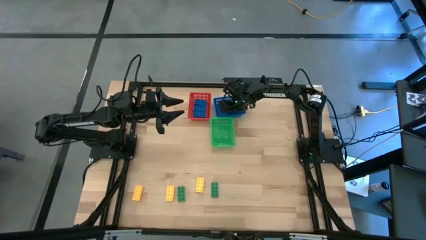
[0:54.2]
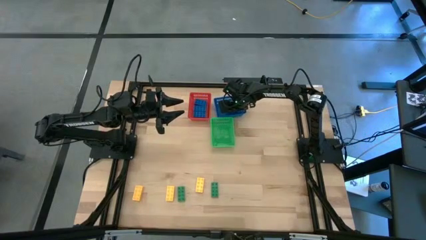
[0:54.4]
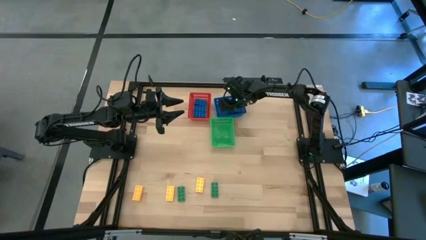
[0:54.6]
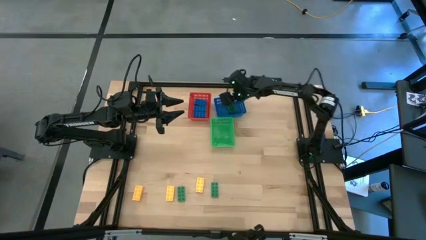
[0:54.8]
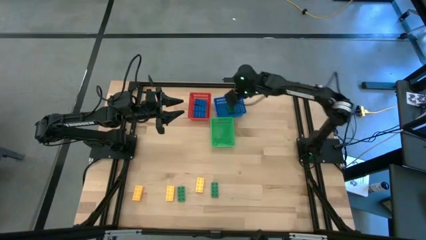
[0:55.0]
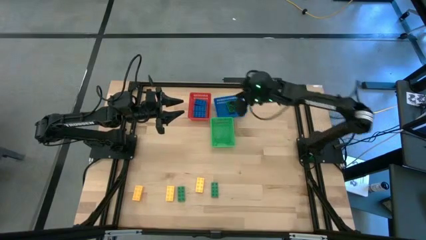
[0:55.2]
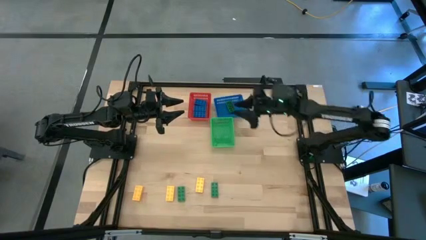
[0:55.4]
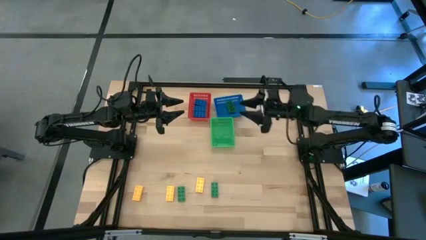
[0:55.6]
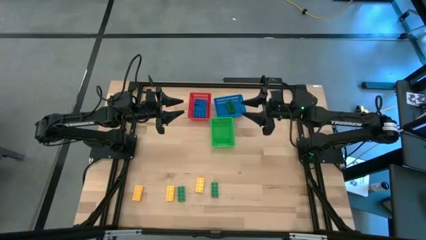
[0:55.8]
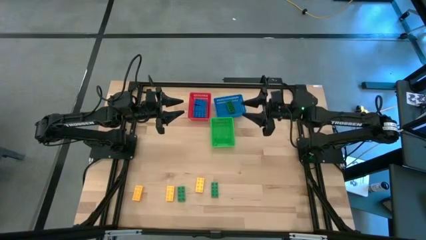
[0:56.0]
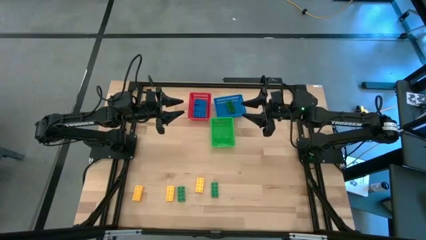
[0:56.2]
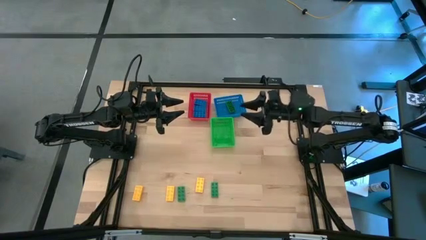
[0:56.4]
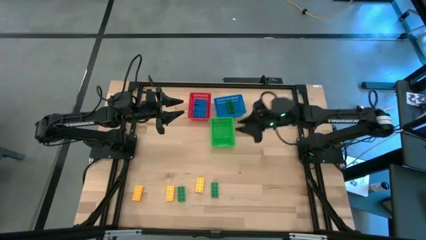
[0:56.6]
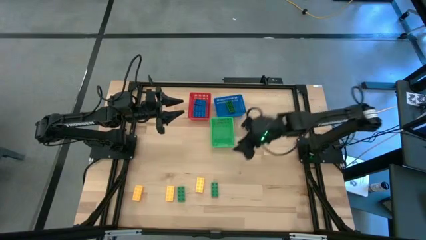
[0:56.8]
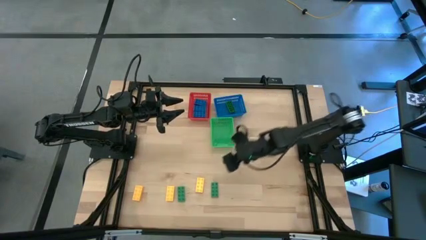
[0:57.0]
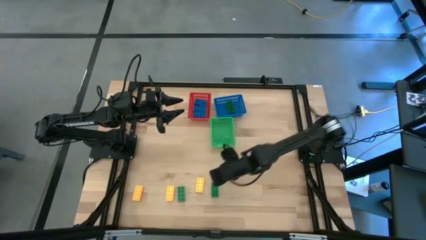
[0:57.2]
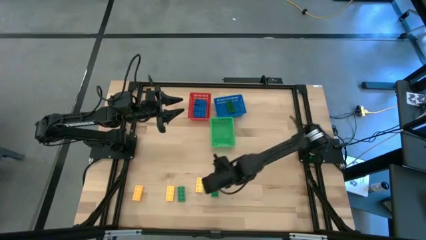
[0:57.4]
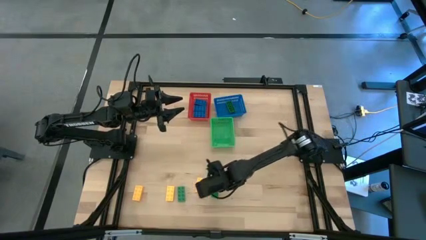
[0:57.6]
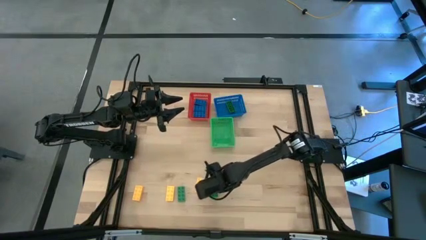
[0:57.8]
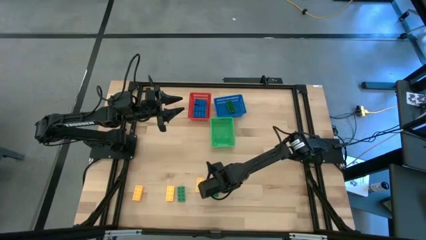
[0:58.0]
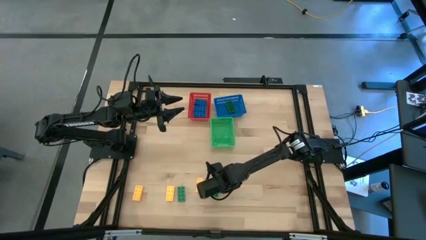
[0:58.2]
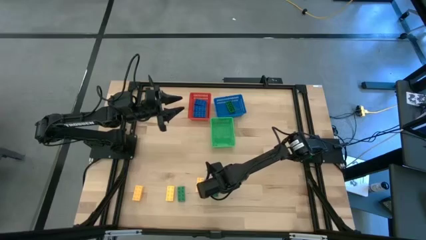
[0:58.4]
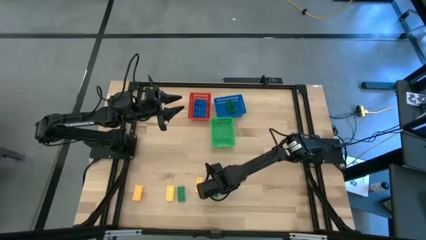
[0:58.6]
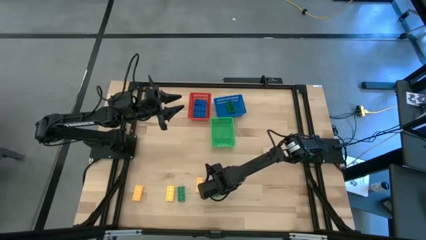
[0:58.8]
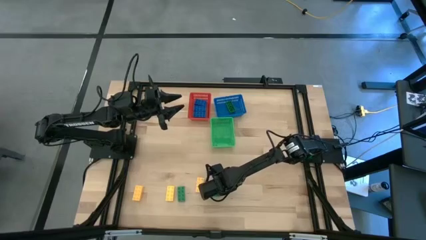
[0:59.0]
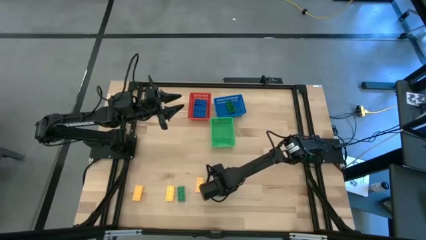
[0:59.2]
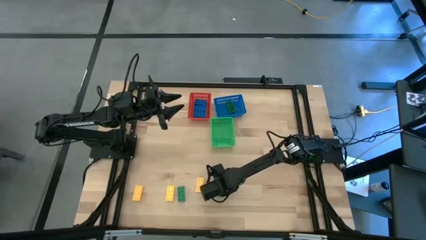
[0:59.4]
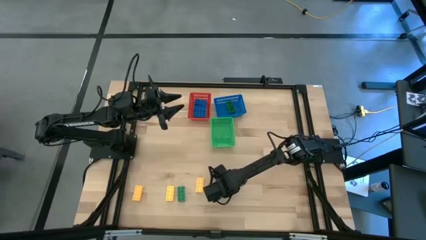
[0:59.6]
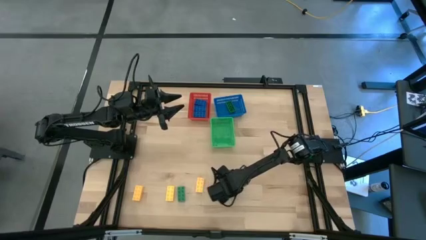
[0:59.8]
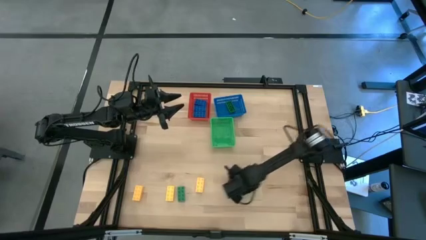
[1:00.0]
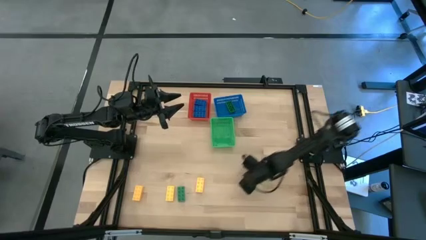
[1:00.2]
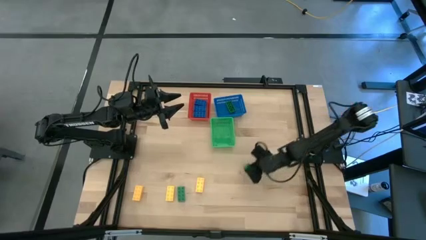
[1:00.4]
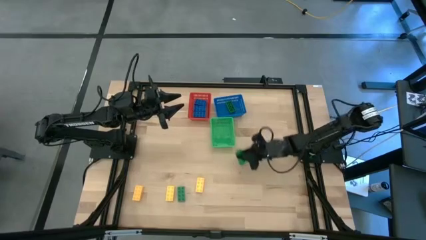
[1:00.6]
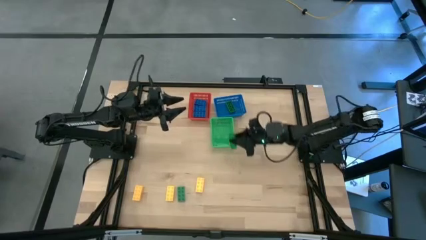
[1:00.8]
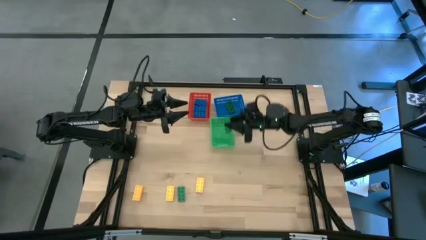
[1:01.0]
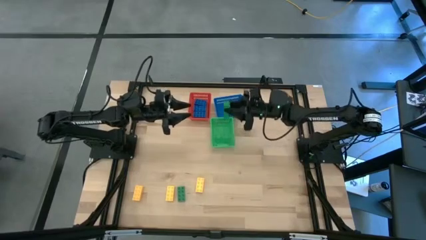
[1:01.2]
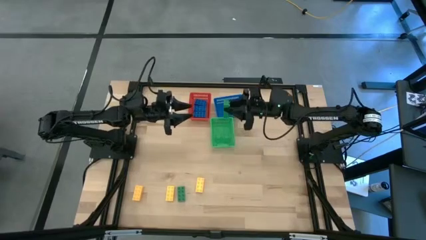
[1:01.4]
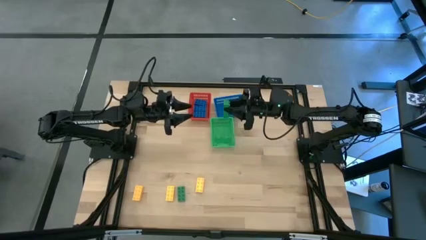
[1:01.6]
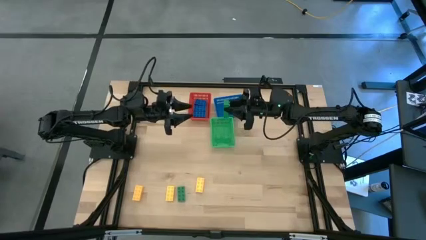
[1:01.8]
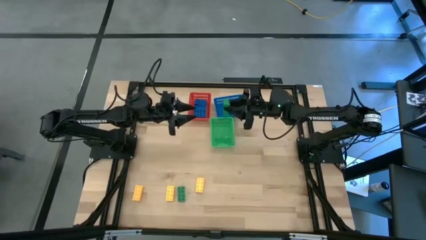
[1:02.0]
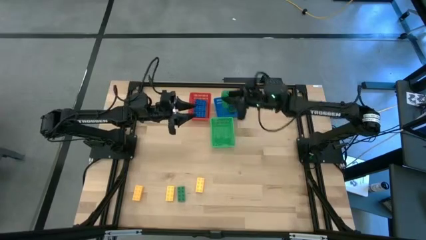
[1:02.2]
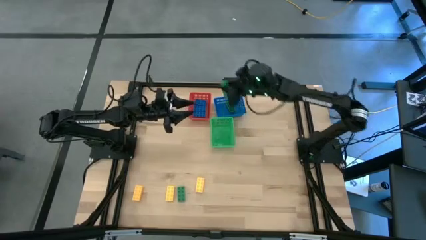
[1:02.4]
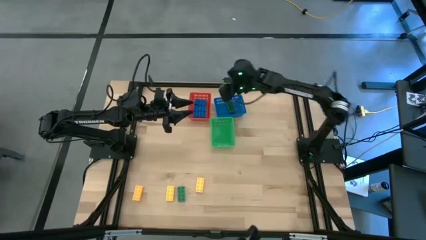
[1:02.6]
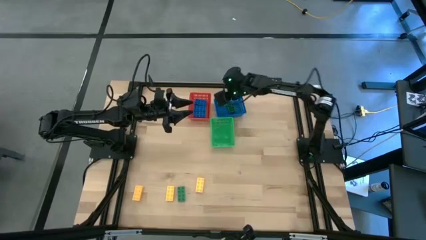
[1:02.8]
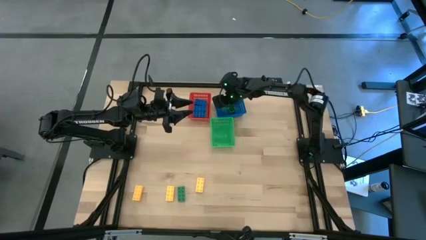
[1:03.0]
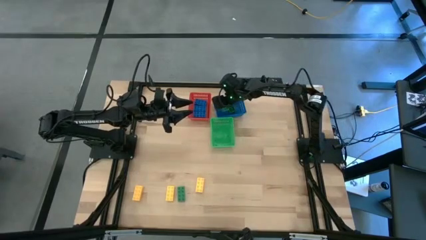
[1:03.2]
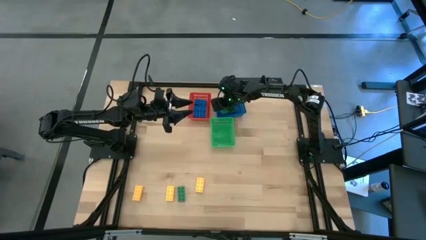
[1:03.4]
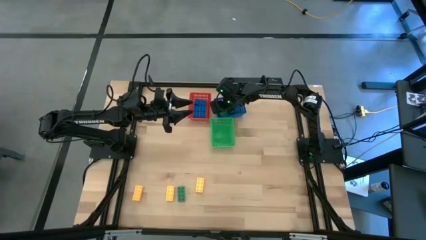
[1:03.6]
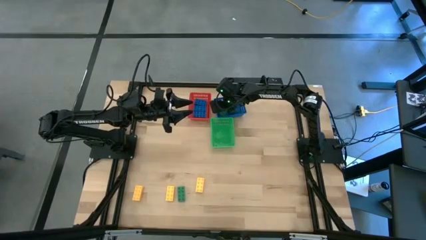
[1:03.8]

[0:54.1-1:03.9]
Task: Sort & place blocks by color
Put the right green game piece into the blue bin

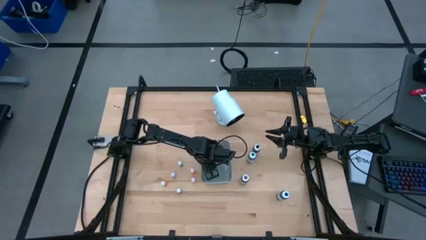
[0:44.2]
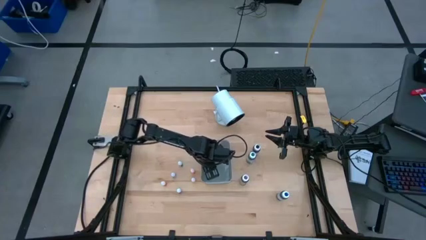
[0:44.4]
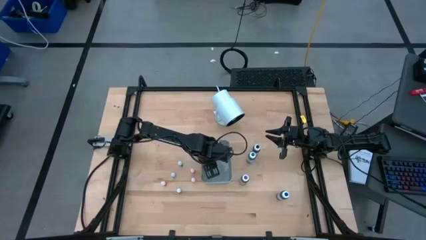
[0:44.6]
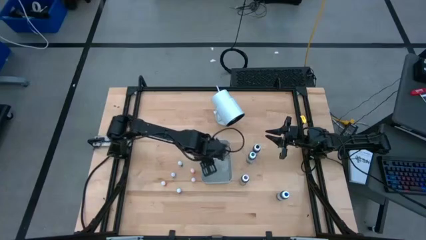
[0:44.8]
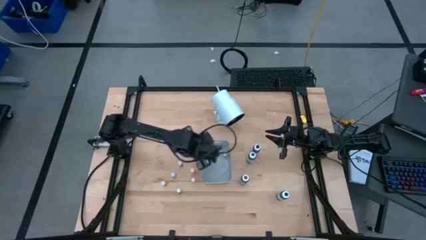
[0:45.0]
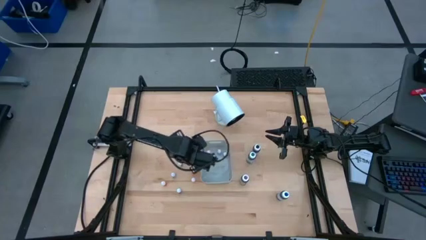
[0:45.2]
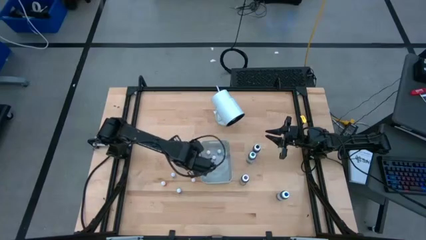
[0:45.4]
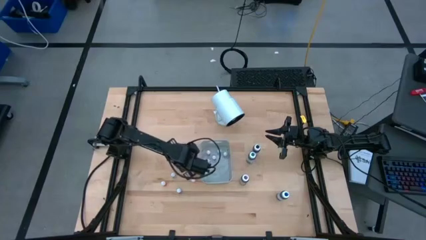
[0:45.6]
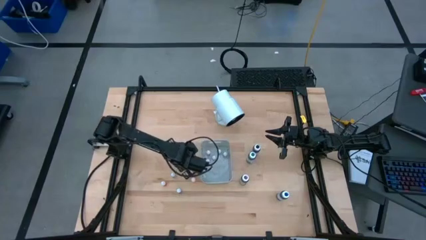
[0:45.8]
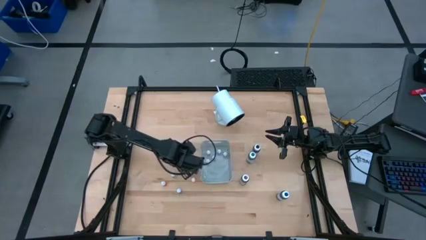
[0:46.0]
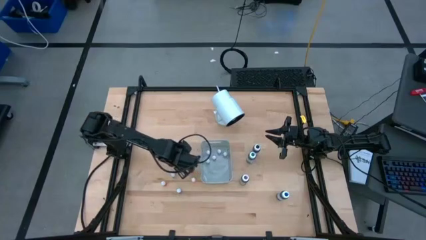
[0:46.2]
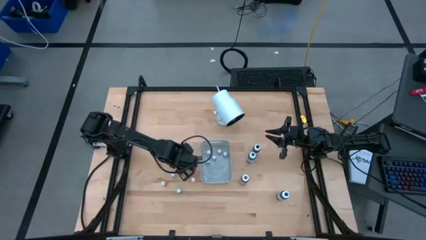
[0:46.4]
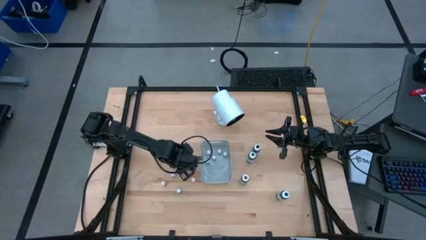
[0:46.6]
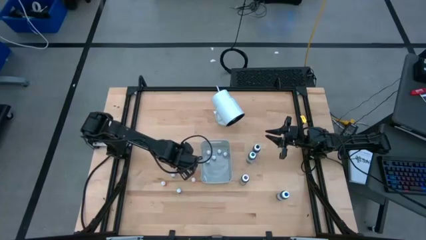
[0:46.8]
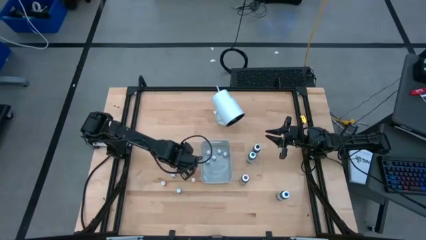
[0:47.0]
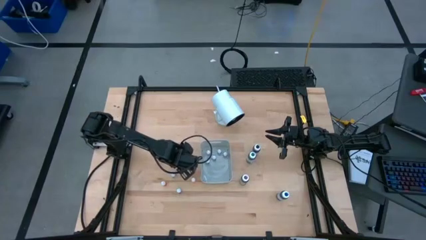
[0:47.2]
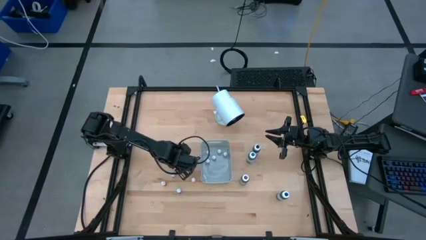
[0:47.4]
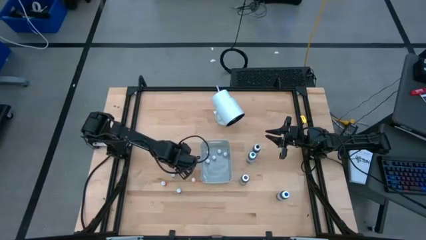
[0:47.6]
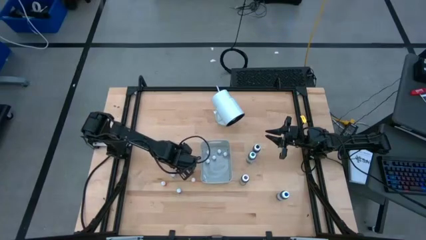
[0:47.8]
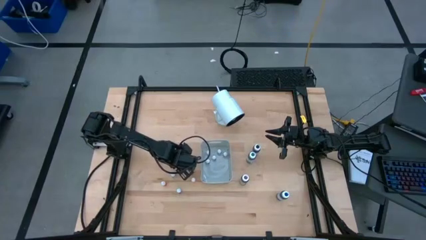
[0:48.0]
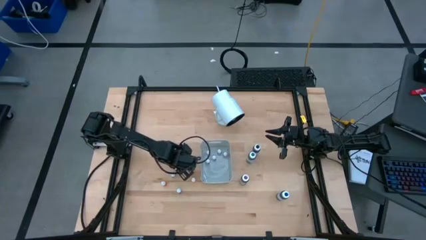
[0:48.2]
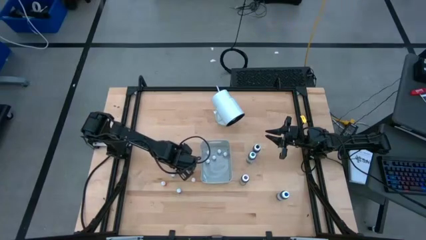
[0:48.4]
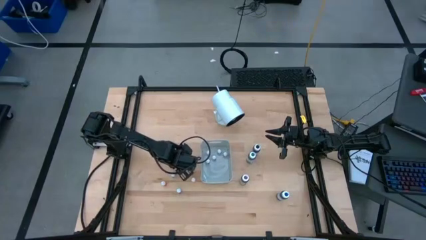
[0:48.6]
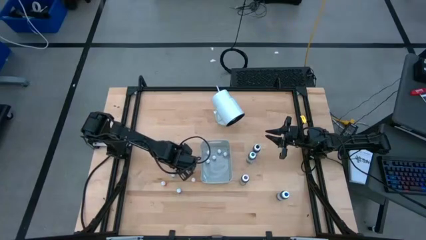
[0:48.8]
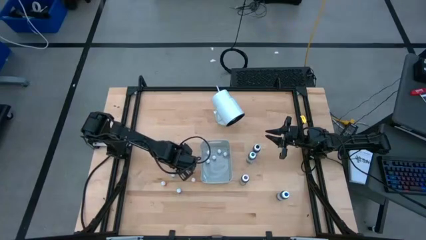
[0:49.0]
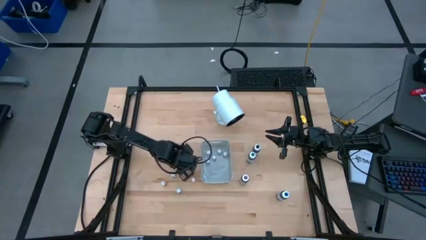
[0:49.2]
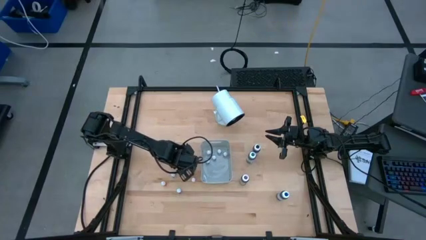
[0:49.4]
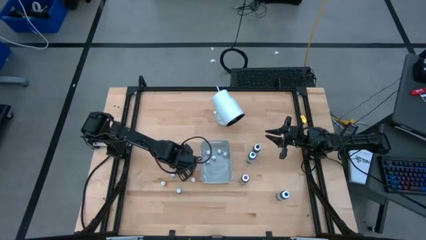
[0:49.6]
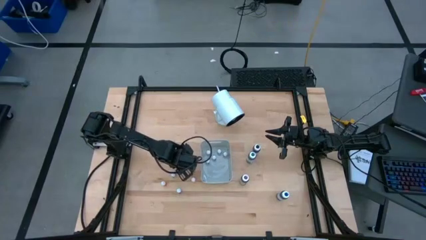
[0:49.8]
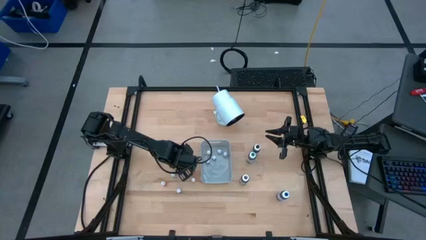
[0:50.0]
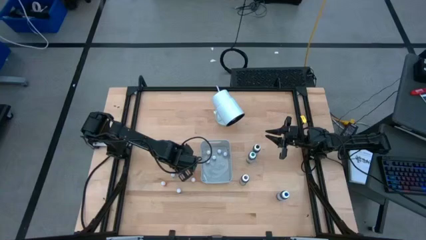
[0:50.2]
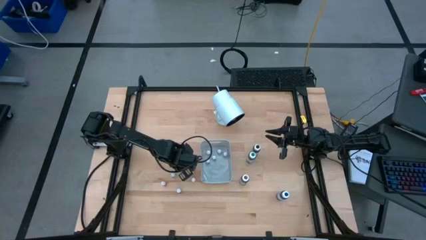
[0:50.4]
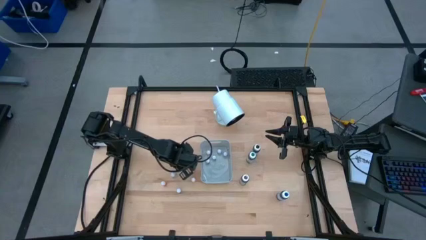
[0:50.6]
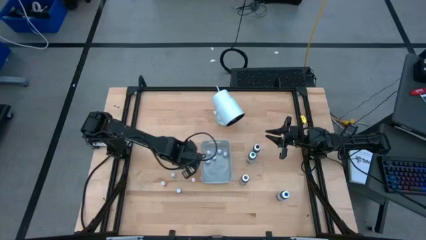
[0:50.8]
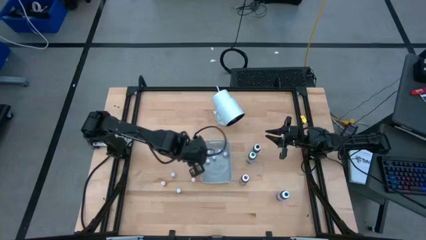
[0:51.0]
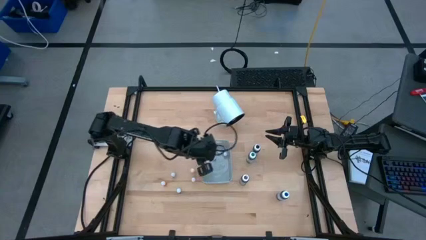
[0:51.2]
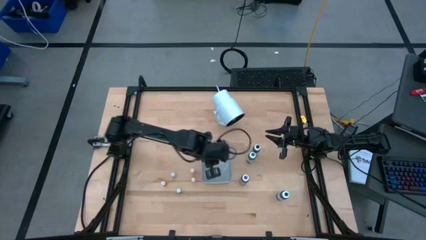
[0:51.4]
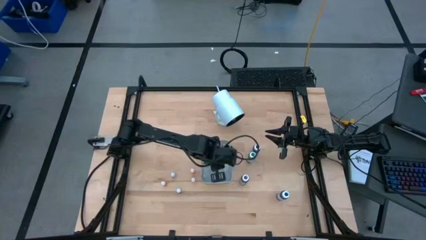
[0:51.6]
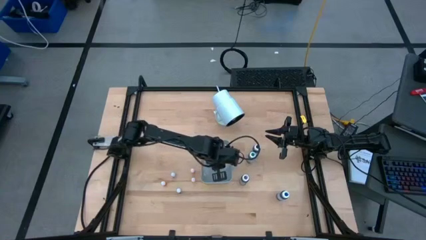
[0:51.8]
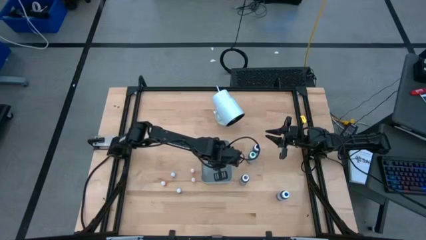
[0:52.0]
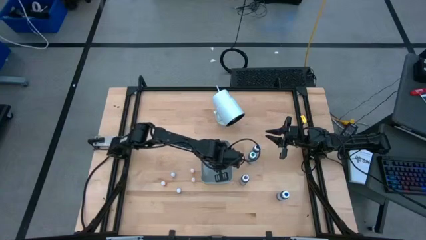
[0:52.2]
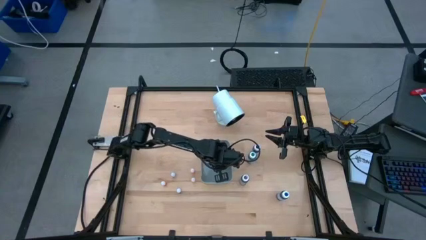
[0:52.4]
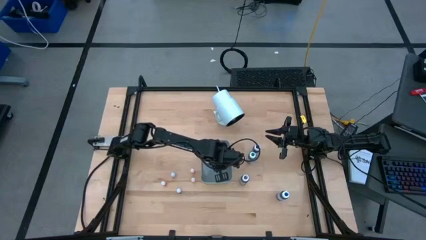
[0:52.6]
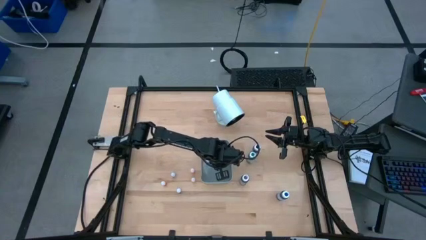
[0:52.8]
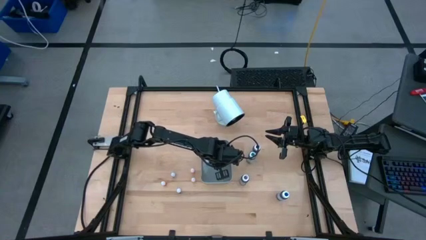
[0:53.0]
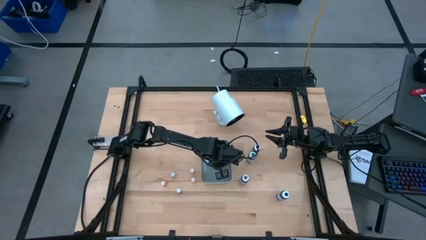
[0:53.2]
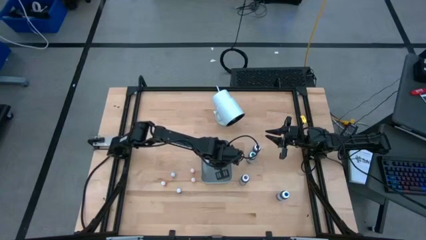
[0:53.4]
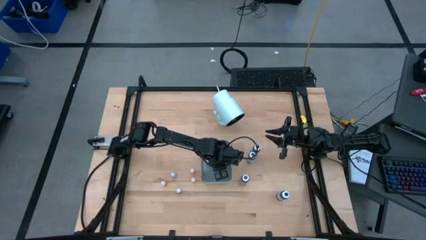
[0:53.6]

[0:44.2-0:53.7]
Task: Pick & Place food coloring
Put the small black food coloring bottle into the gray bin
